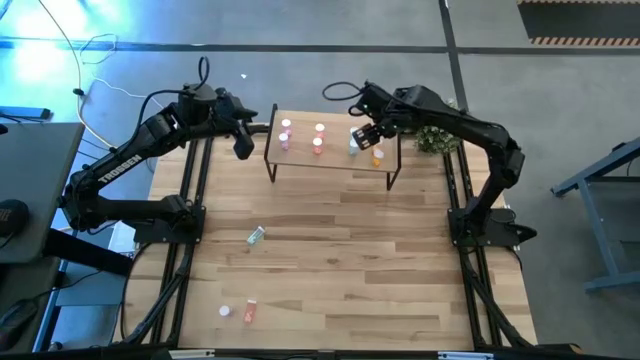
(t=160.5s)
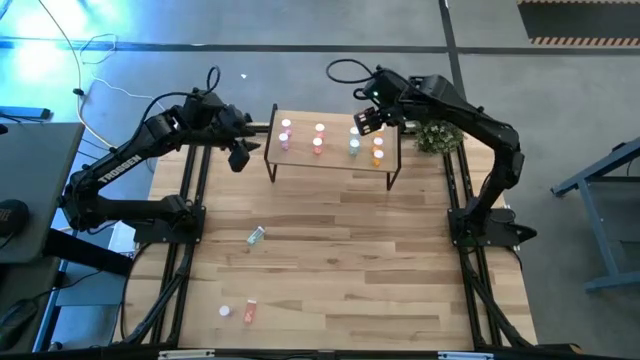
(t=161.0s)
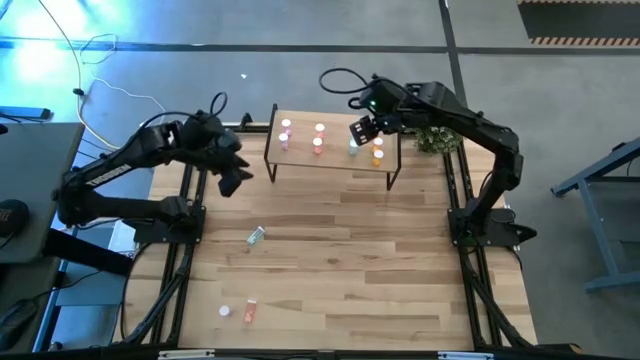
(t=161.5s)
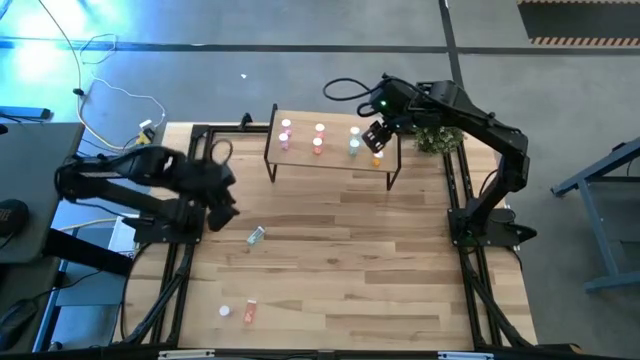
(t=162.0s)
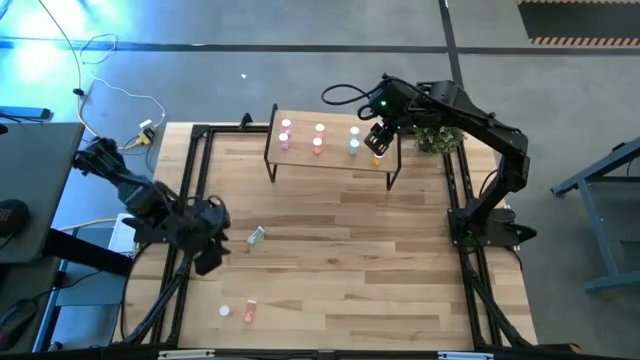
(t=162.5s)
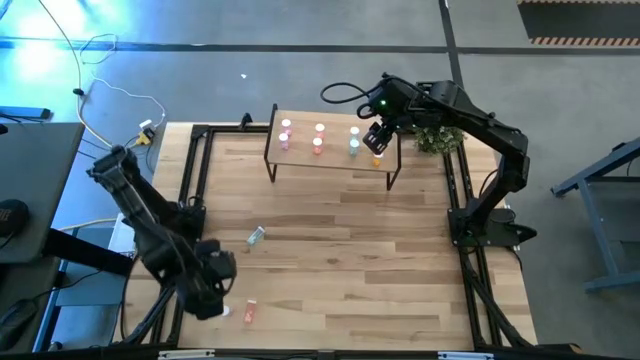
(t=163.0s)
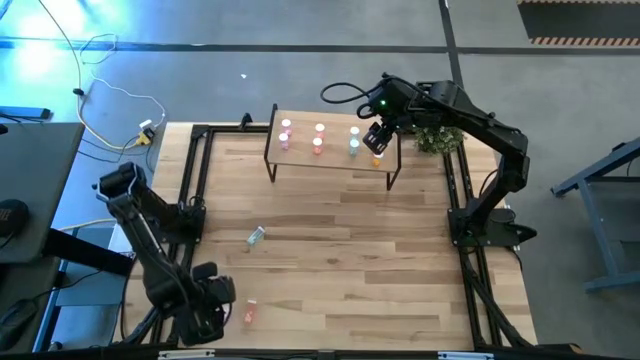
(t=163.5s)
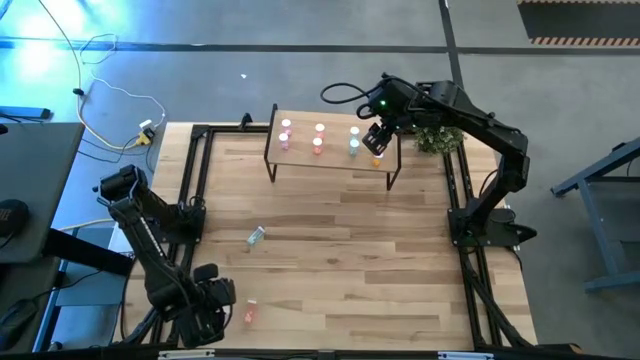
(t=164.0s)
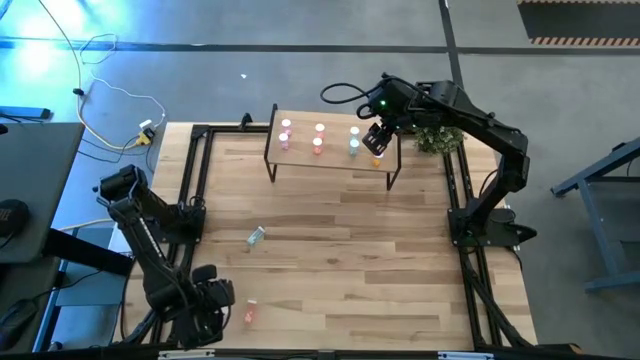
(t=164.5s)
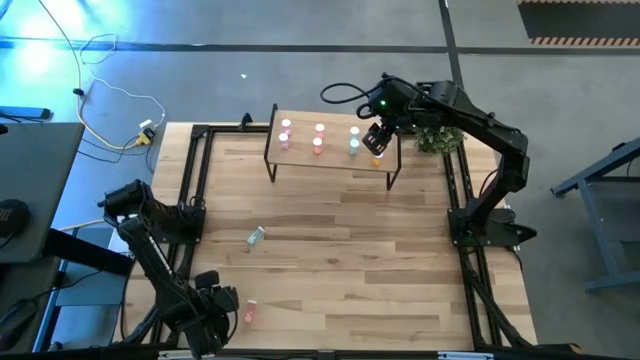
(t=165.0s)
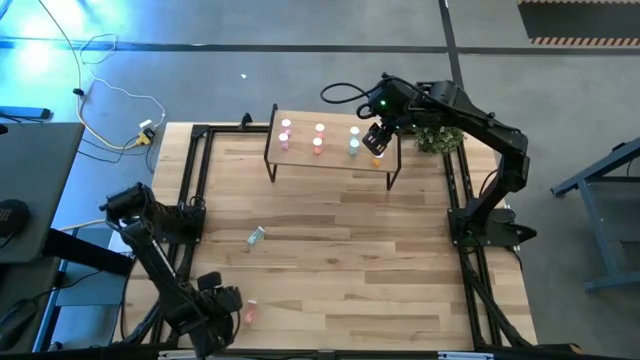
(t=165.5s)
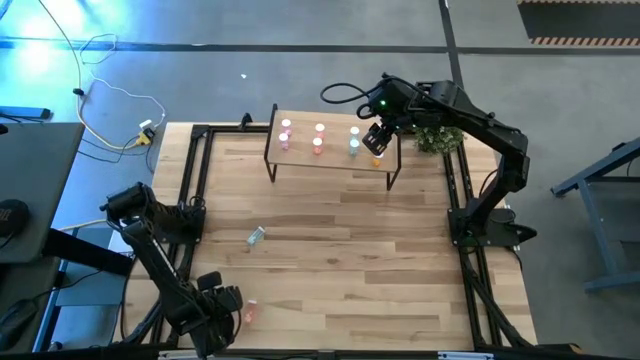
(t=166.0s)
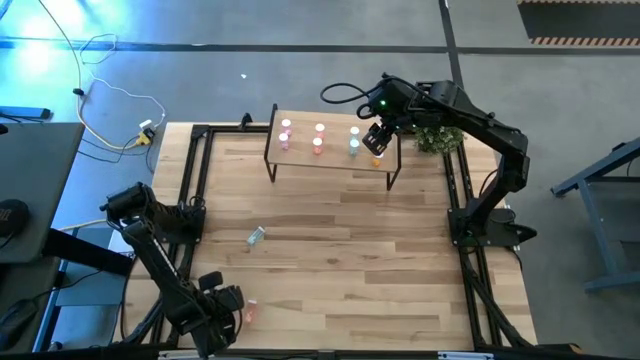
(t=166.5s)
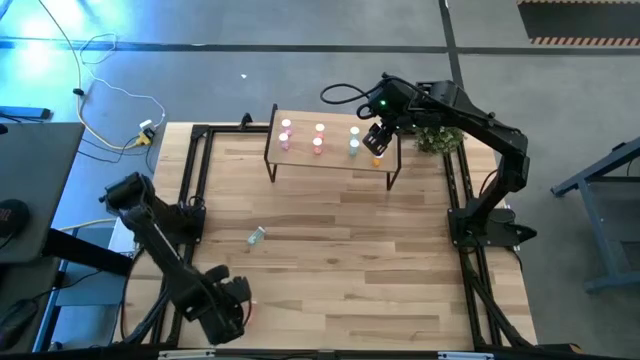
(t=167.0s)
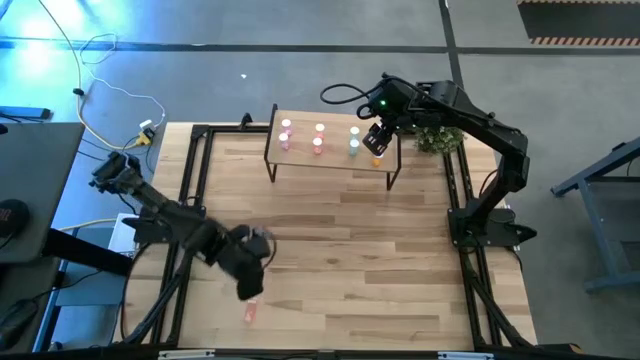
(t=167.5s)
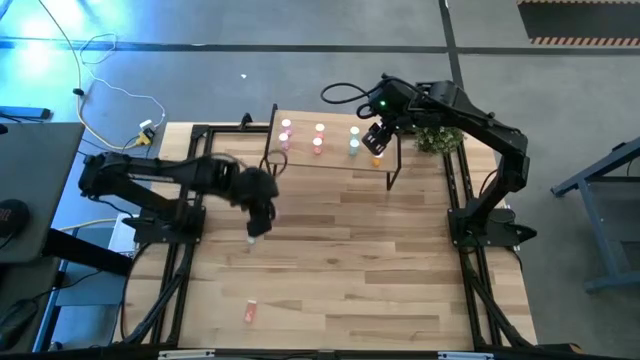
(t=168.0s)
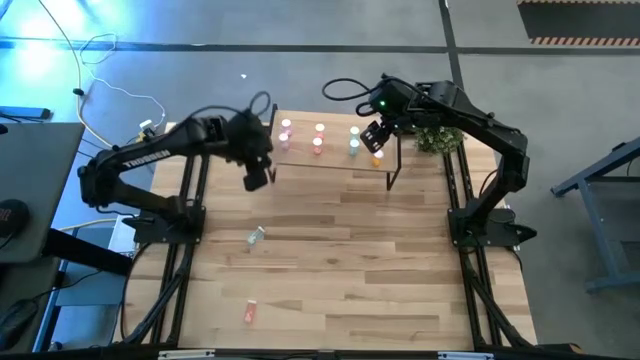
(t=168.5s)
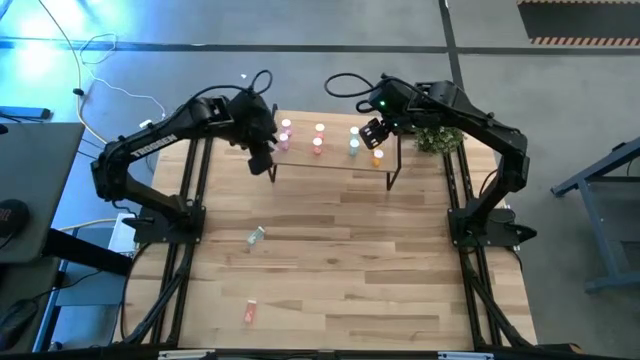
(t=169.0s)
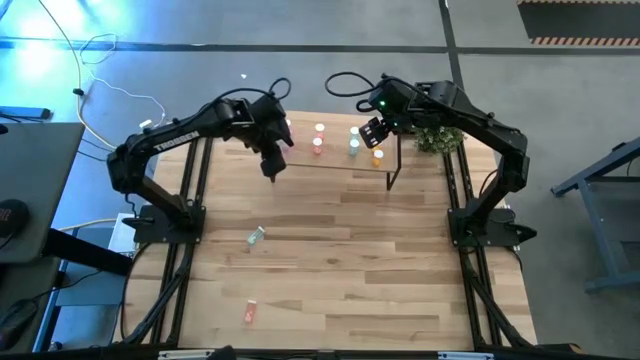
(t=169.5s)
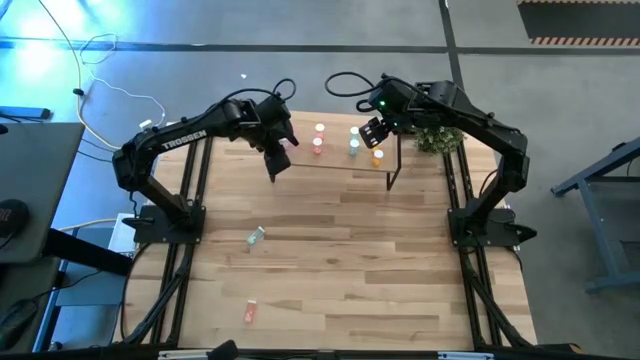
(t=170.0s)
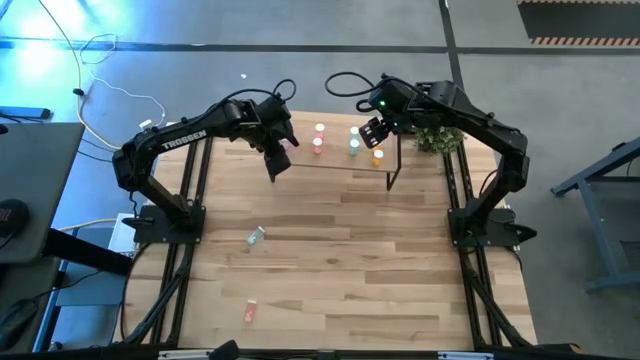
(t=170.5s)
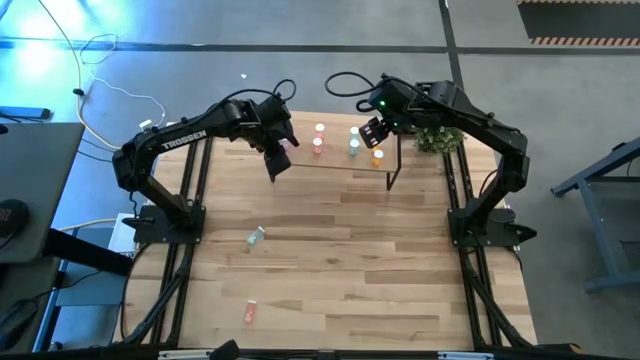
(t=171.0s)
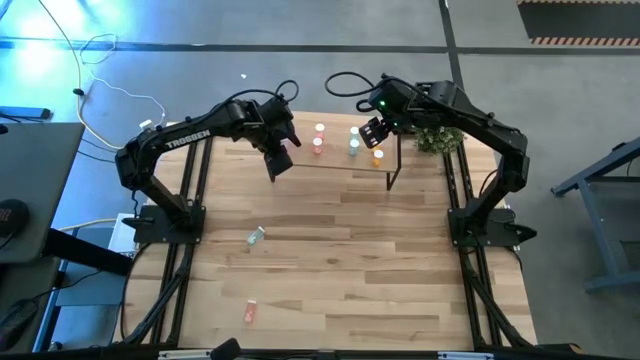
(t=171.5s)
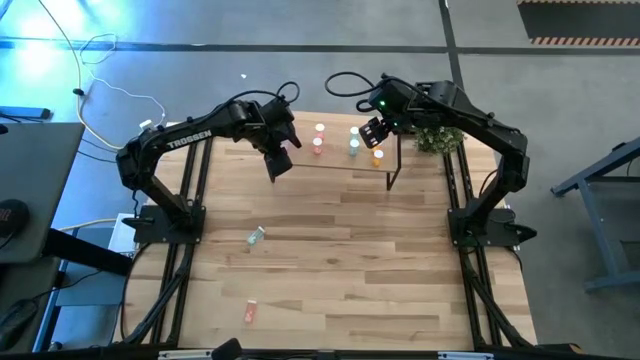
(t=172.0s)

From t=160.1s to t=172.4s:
Task: Pick and place medicine bottles onto shelf by color
Put the violet pill bottle aligned with the other violet pill bottles on the shelf

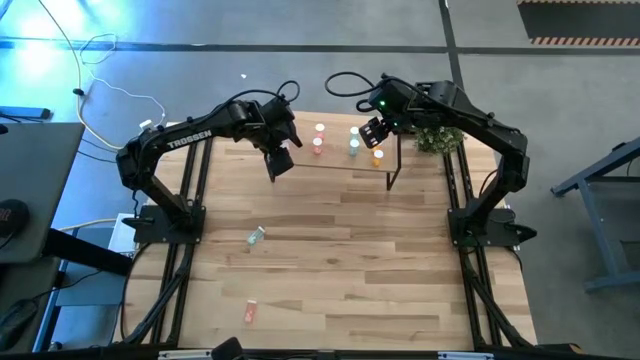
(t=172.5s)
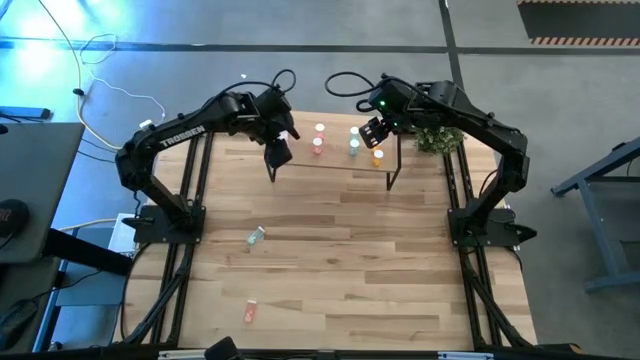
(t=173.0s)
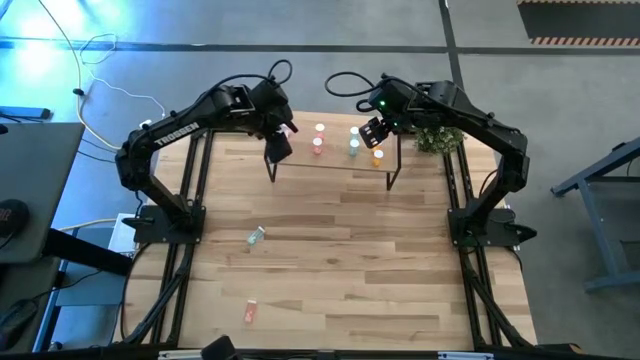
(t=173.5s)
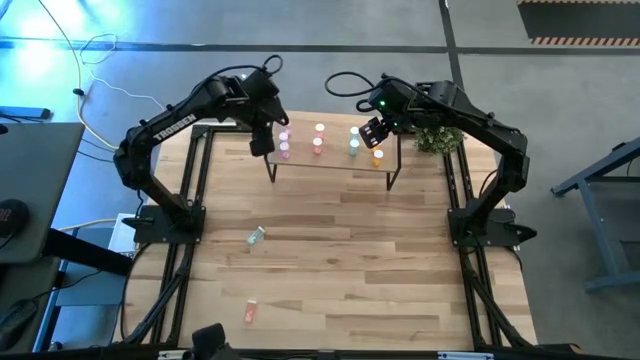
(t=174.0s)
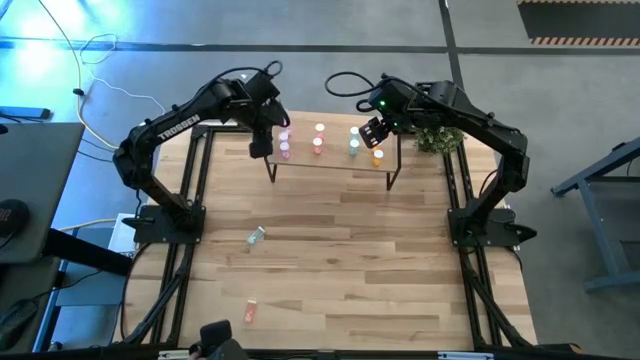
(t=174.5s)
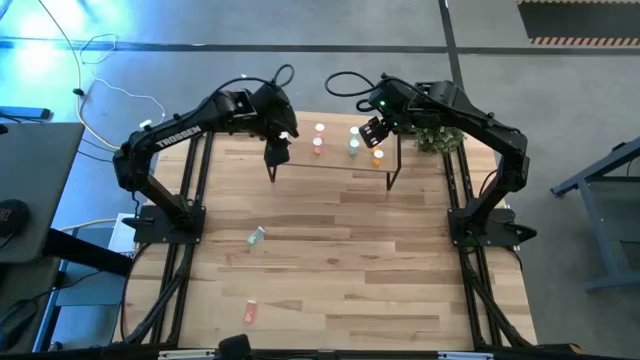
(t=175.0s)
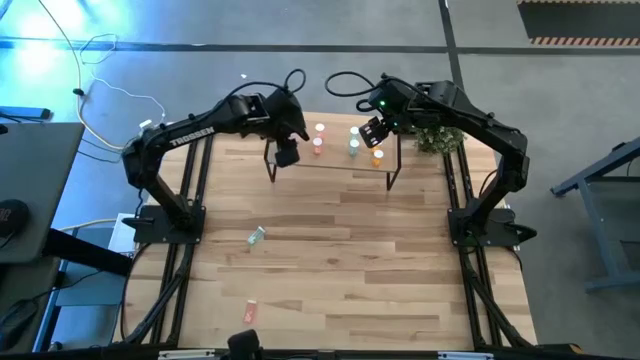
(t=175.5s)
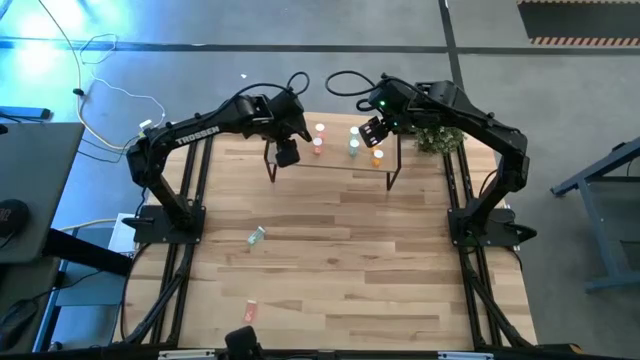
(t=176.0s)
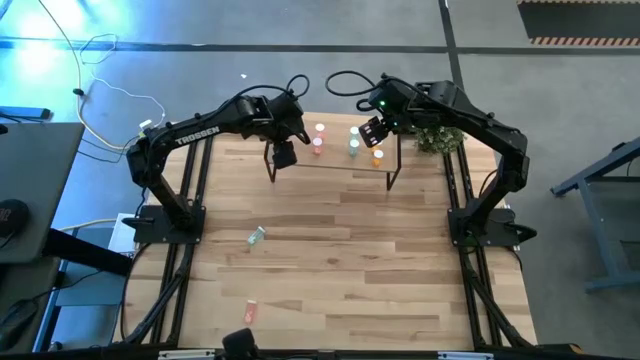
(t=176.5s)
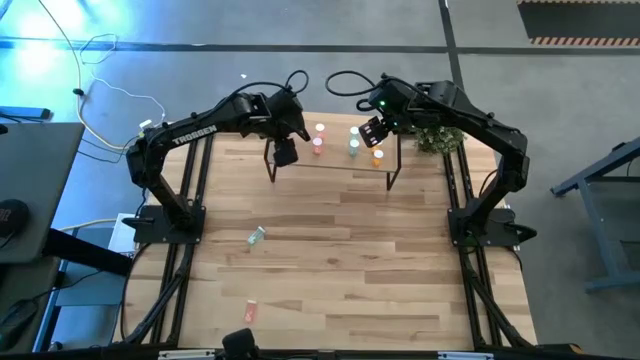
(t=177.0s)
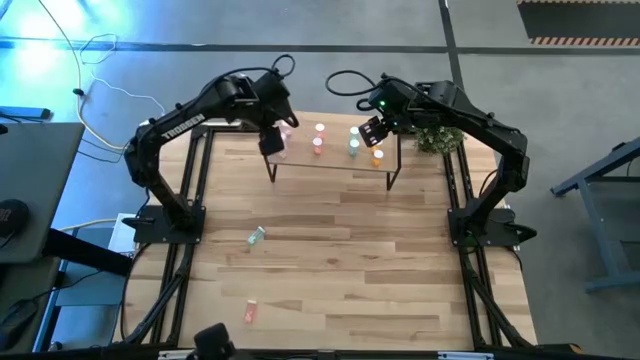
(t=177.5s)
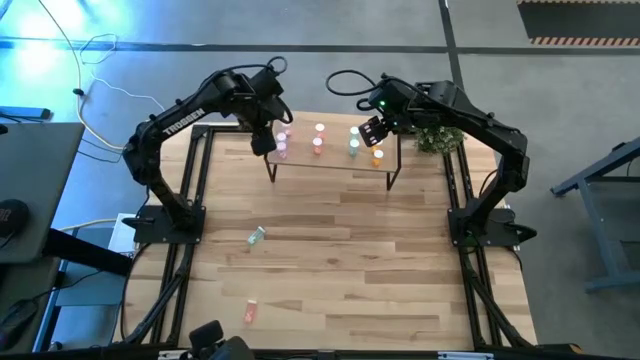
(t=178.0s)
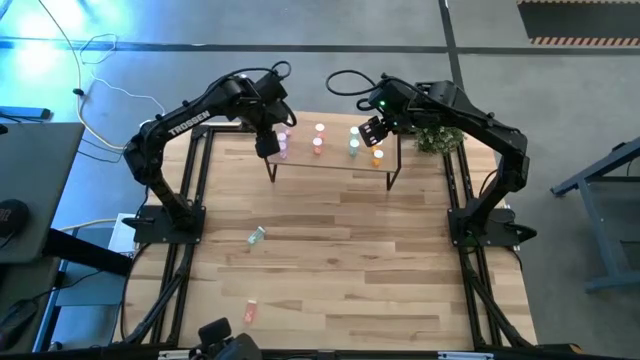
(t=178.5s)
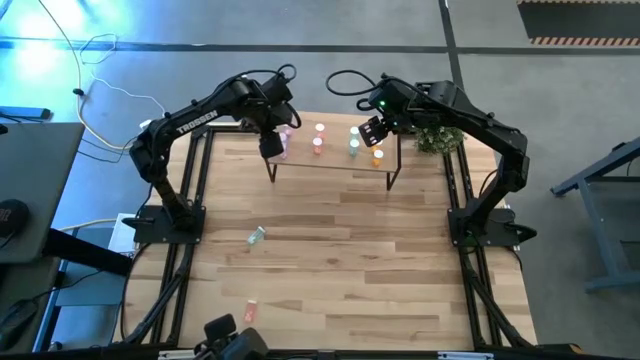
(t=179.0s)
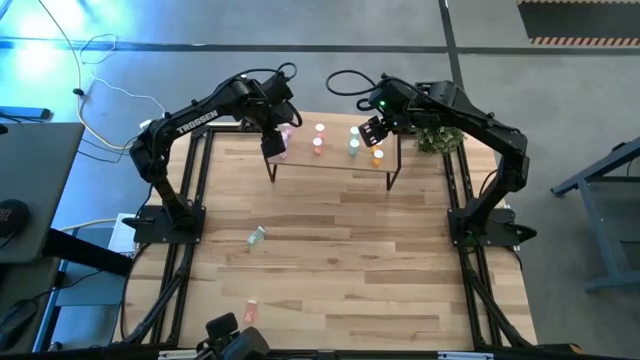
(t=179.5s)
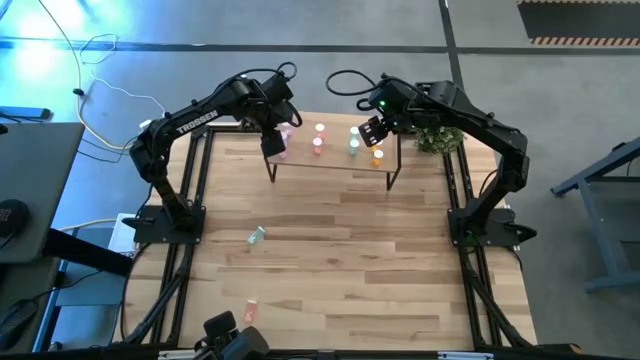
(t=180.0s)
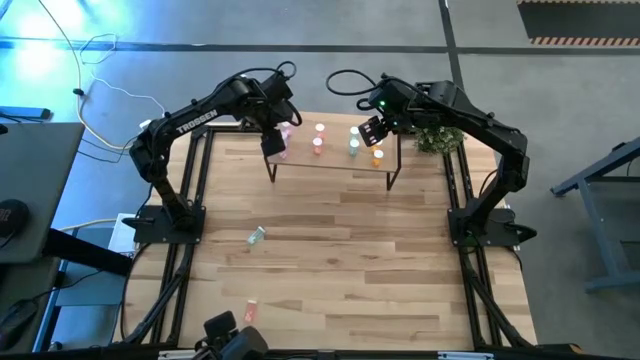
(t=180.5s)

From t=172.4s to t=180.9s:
Adjust the pink pill bottles on the shelf
